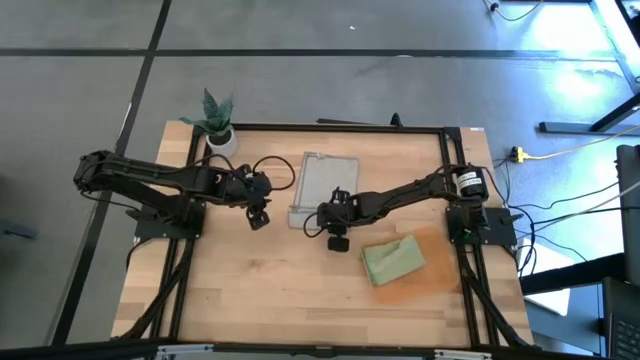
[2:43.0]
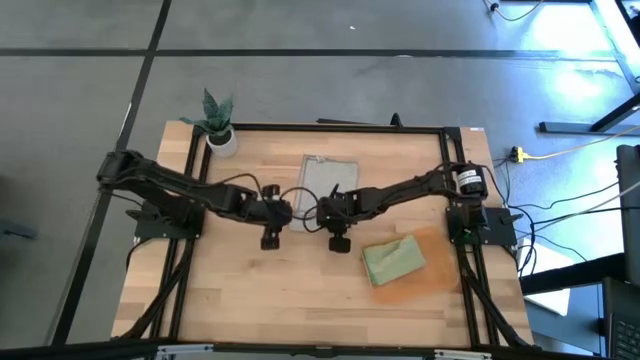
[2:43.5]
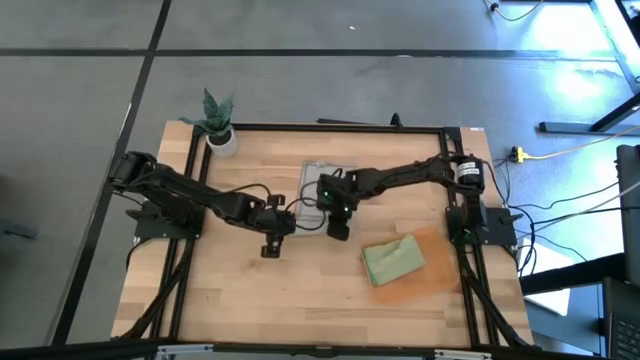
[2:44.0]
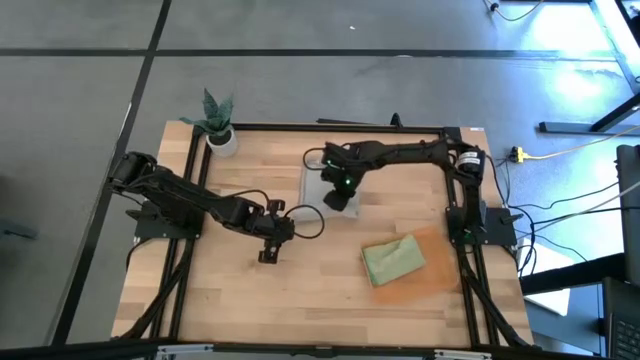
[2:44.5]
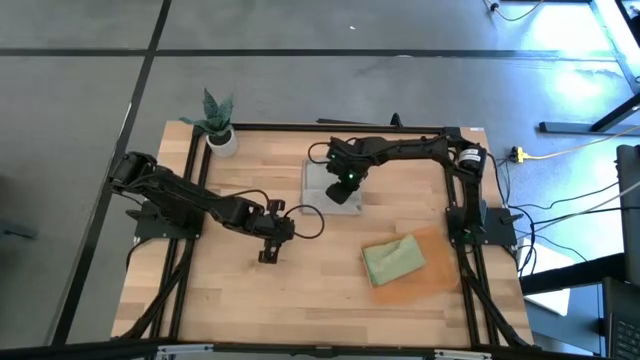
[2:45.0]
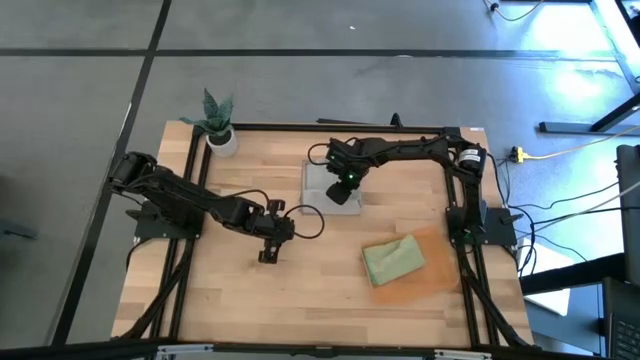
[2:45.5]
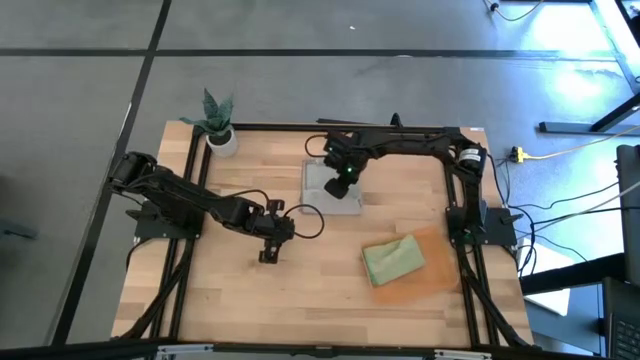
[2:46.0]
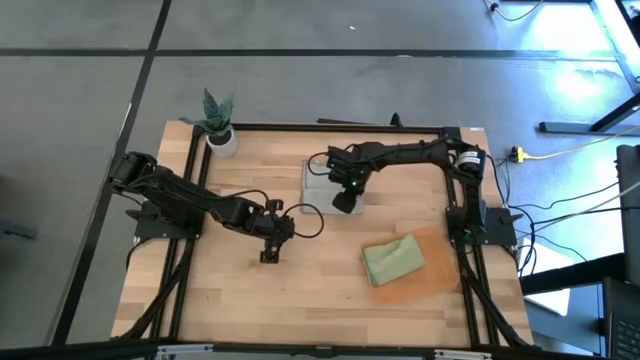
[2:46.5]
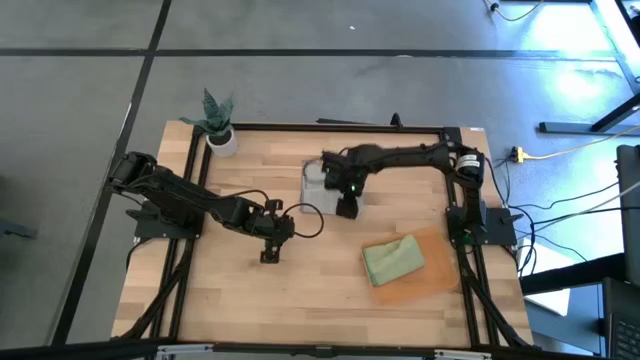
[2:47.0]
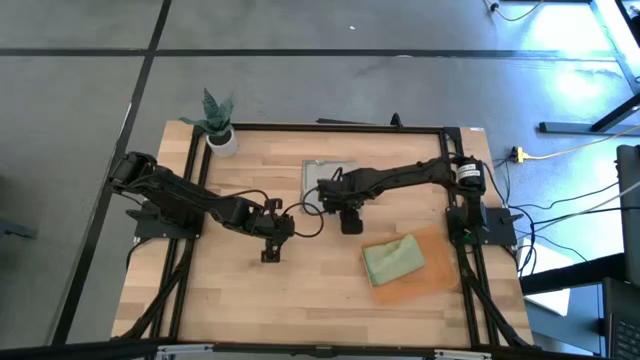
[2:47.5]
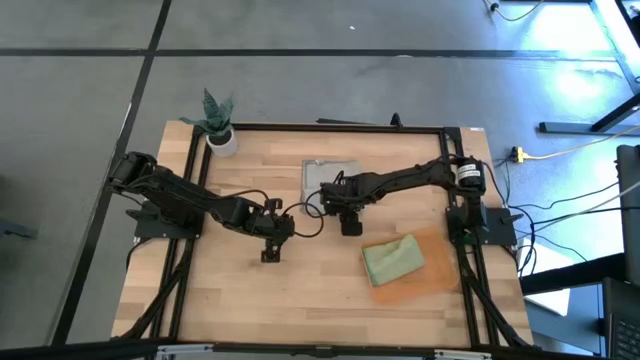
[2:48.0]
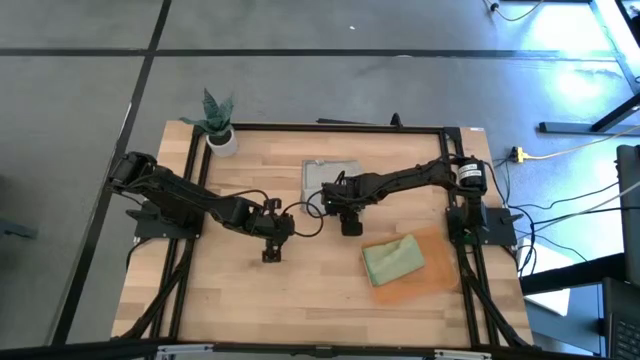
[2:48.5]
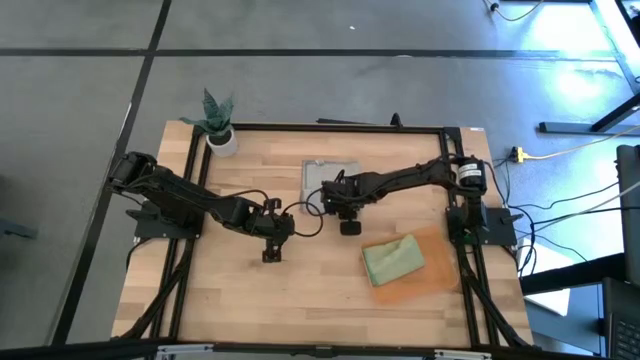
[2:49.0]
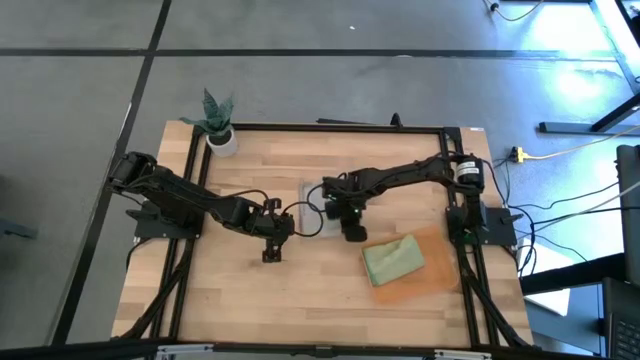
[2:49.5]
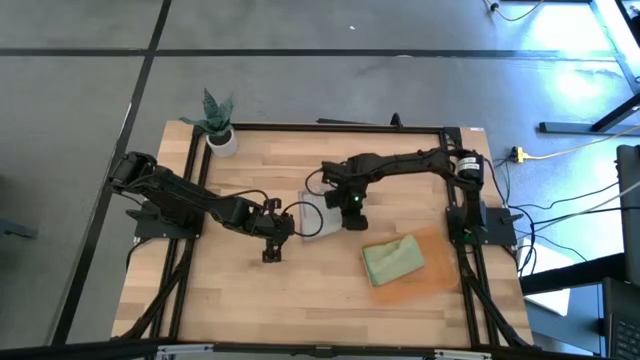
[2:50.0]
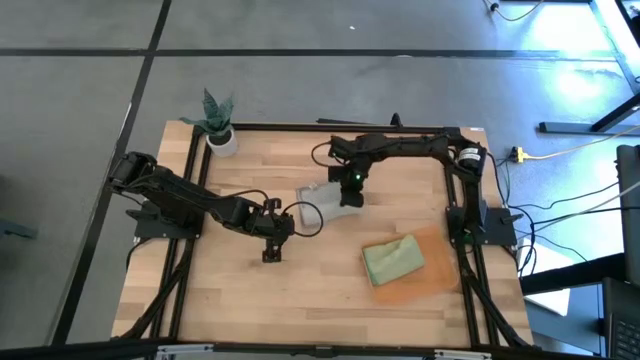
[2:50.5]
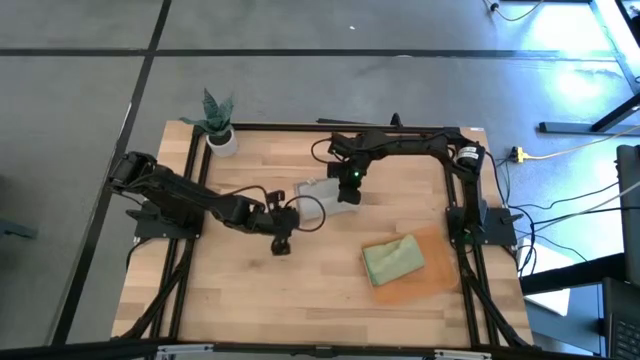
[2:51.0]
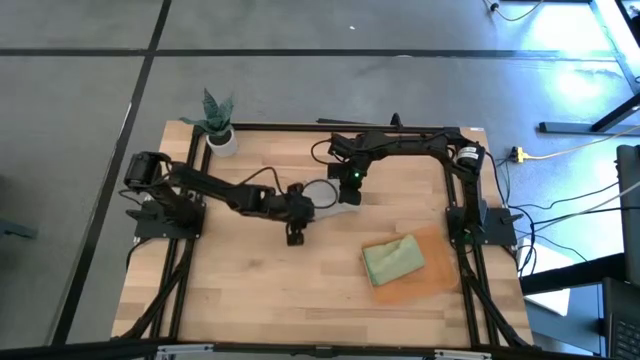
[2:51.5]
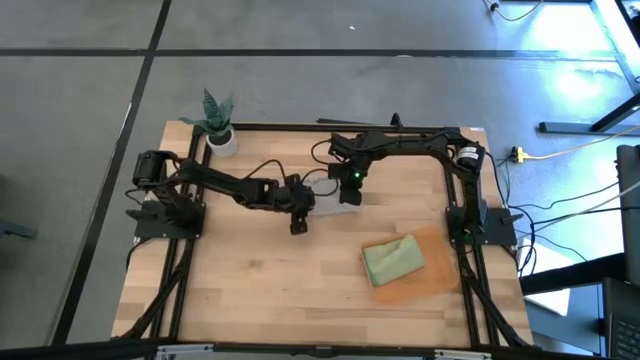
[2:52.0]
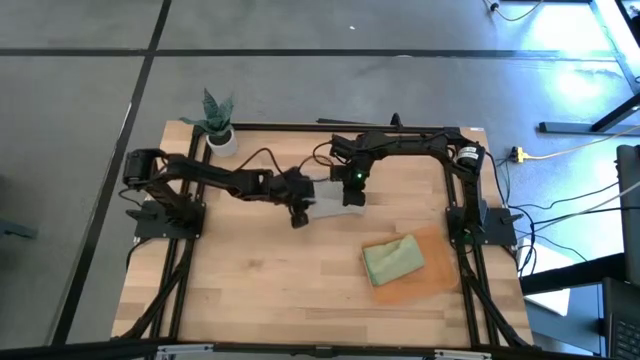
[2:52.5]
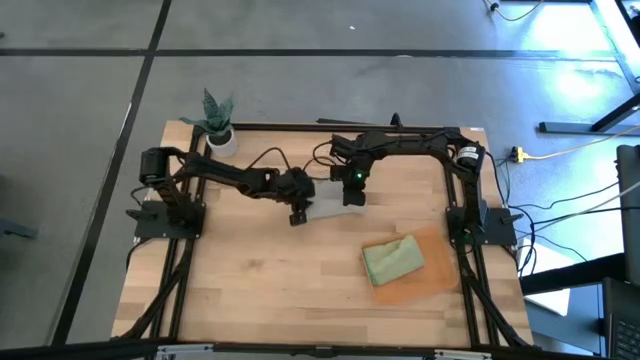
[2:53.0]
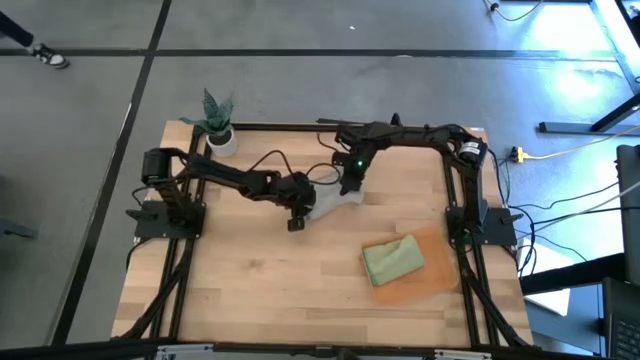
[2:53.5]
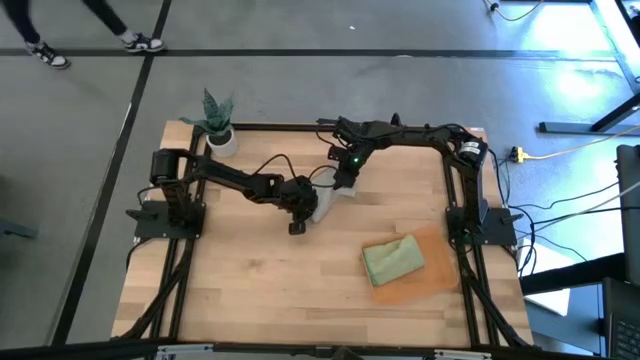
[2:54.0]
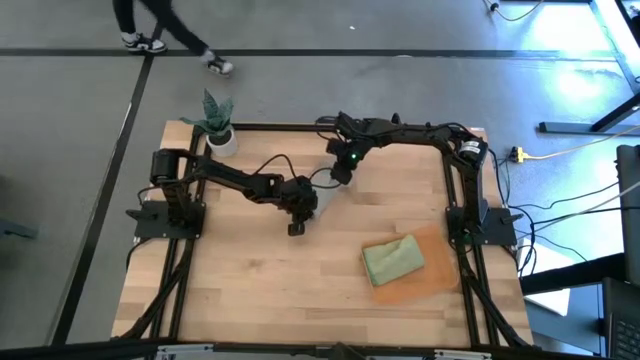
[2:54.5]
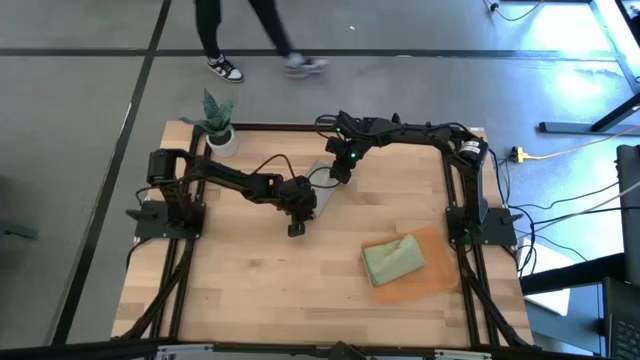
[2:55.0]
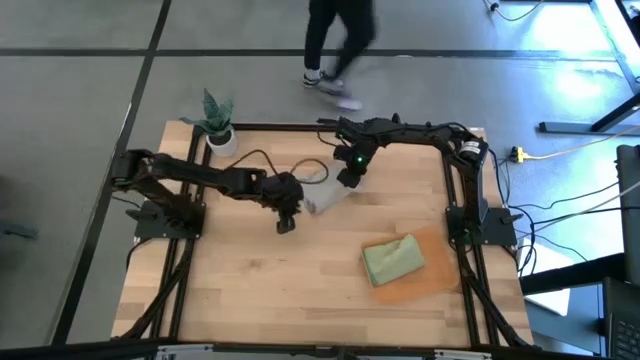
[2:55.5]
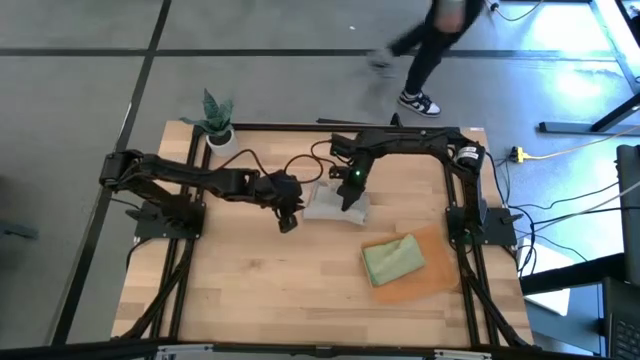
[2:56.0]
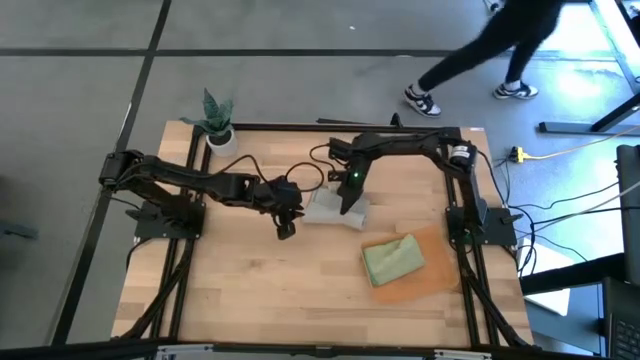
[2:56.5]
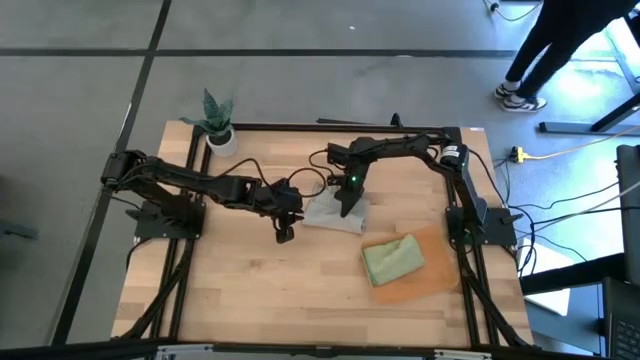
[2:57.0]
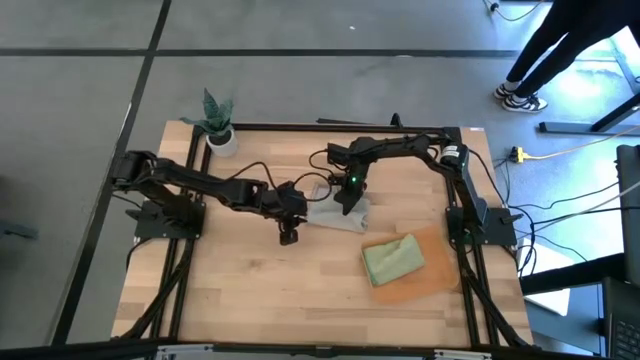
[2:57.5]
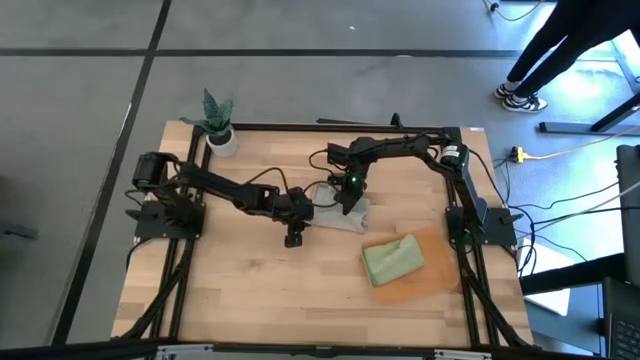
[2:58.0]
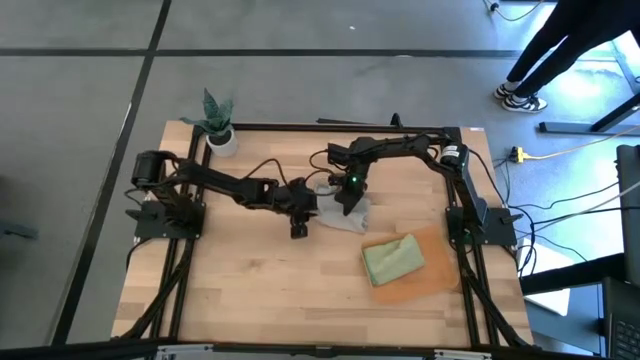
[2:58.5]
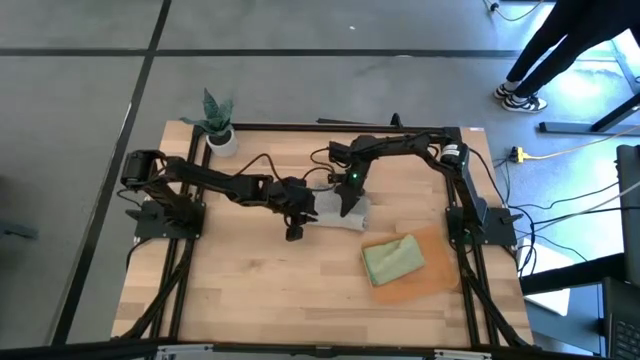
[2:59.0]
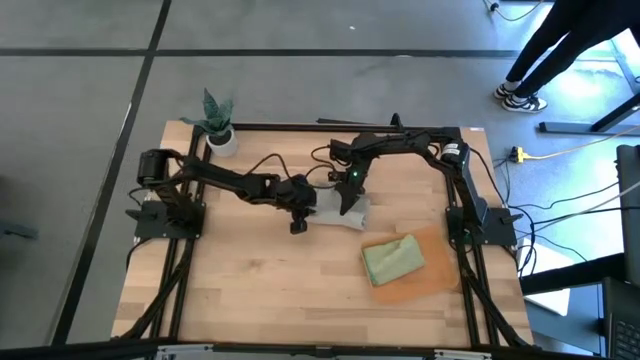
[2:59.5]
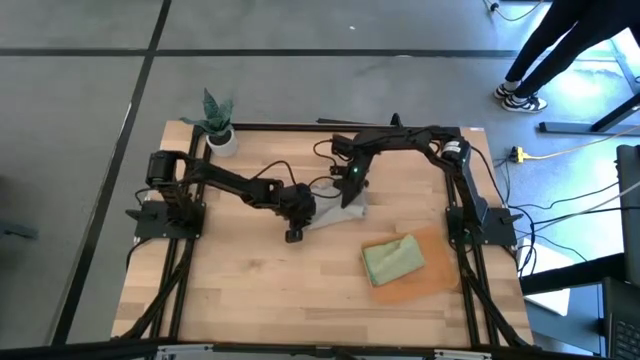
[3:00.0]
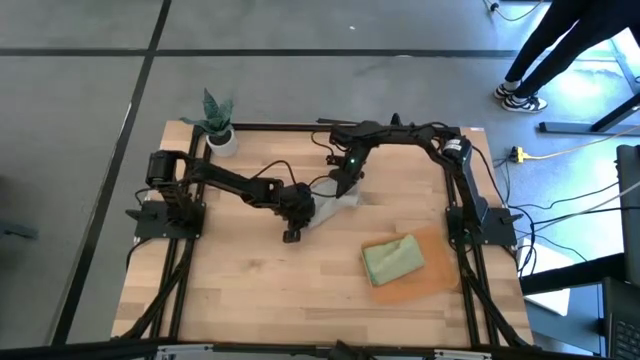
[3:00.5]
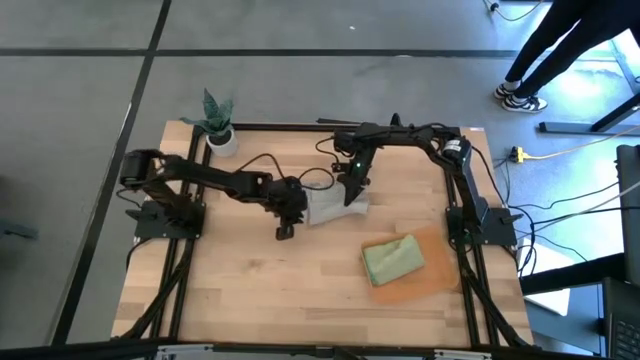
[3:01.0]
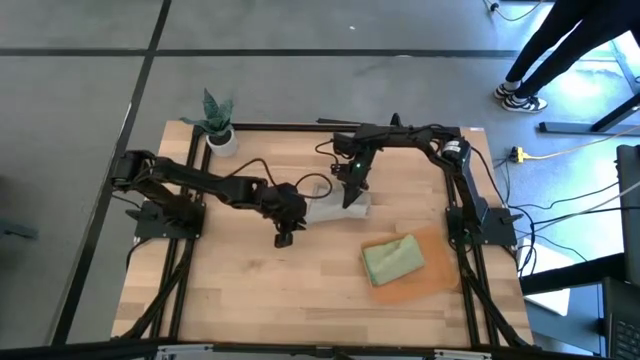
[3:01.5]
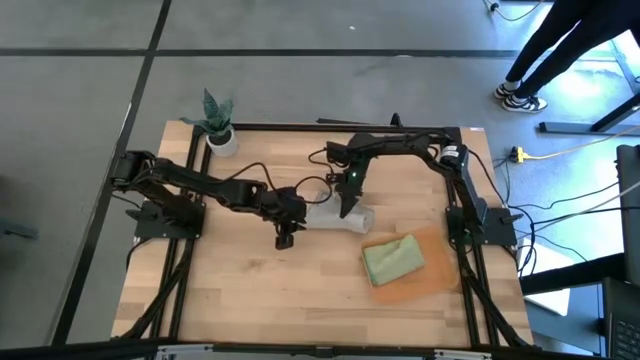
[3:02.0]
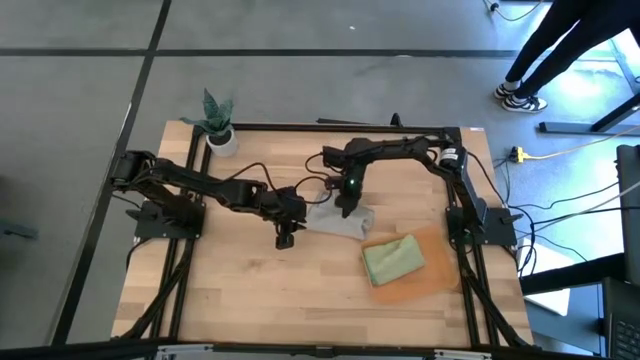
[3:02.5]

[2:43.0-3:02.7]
Task: Roll microfiber towels into tight, uniform cylinder then place into a basket
Roll the gray microfiber towel
